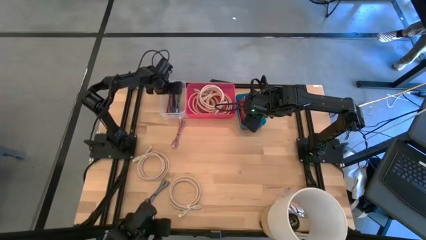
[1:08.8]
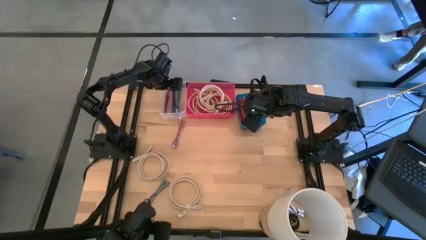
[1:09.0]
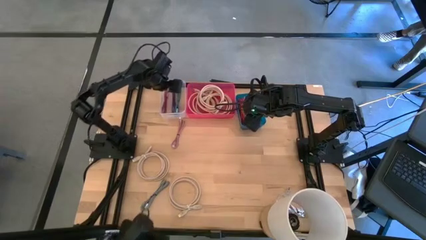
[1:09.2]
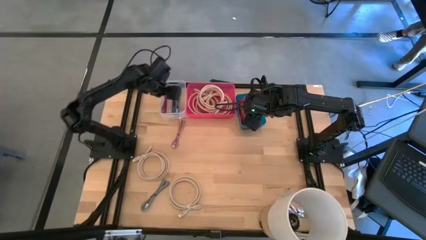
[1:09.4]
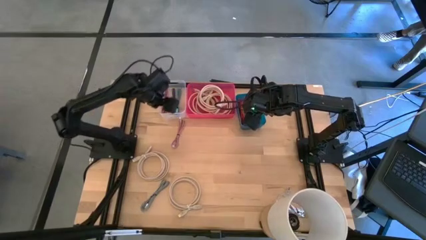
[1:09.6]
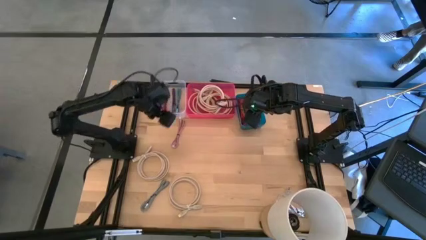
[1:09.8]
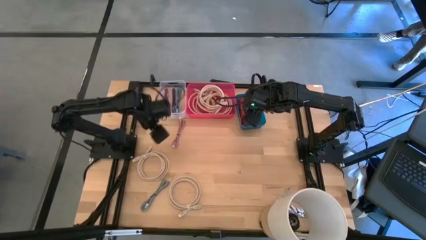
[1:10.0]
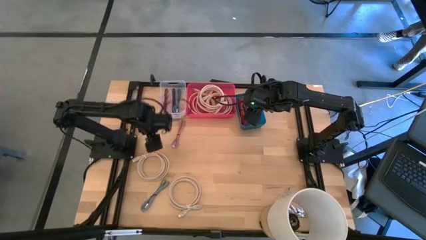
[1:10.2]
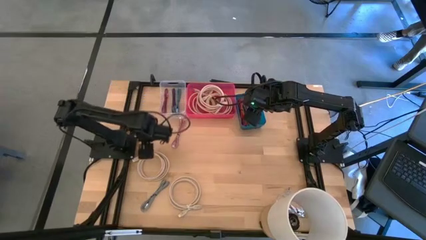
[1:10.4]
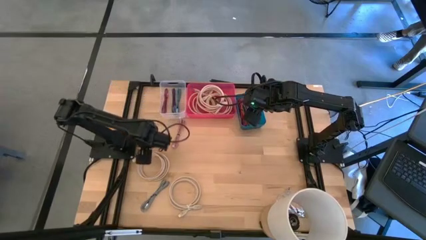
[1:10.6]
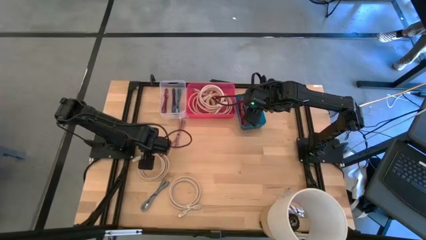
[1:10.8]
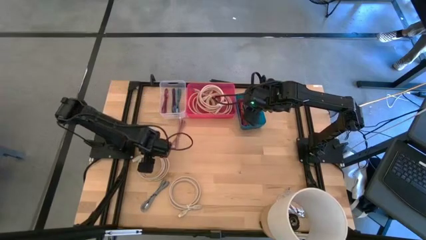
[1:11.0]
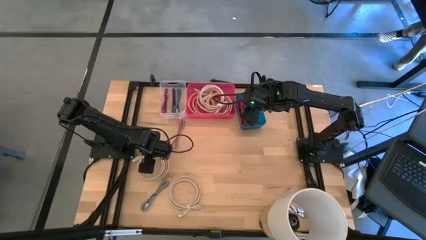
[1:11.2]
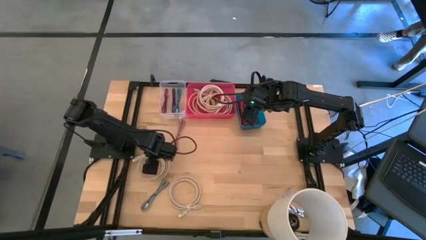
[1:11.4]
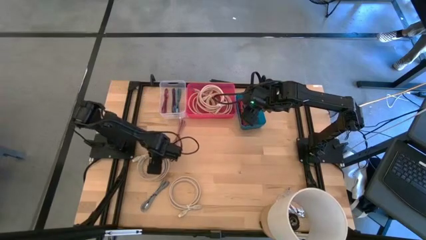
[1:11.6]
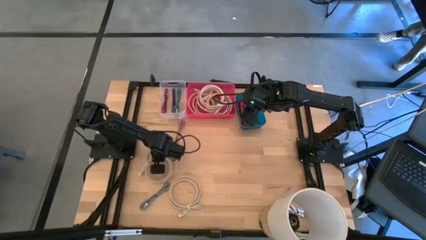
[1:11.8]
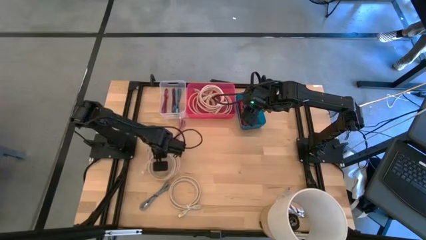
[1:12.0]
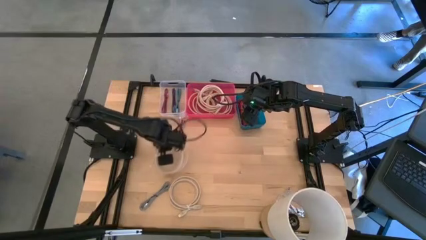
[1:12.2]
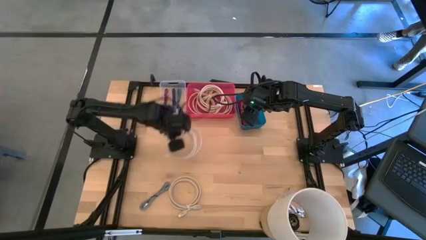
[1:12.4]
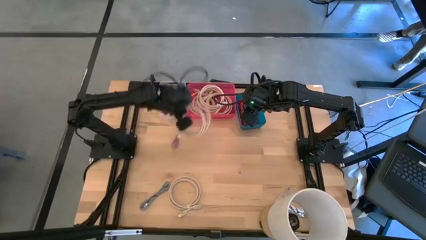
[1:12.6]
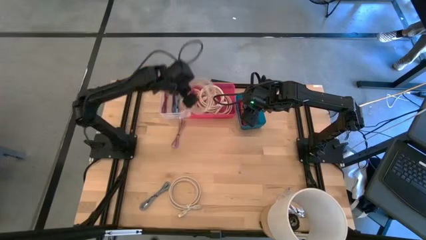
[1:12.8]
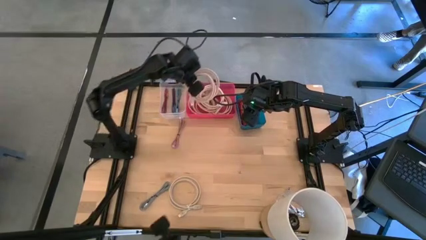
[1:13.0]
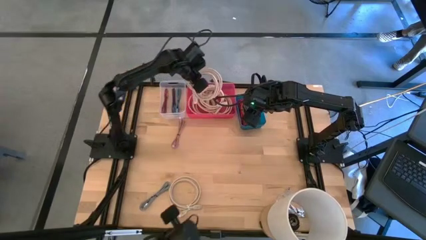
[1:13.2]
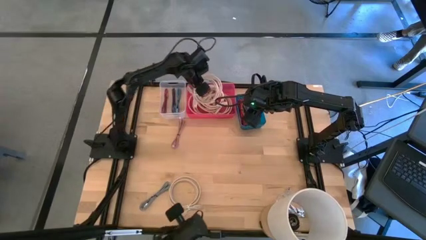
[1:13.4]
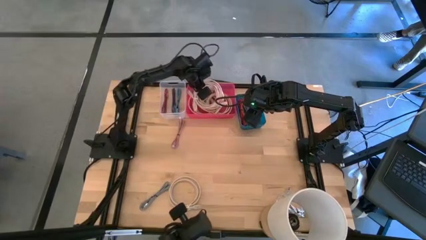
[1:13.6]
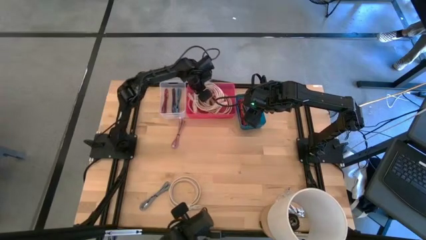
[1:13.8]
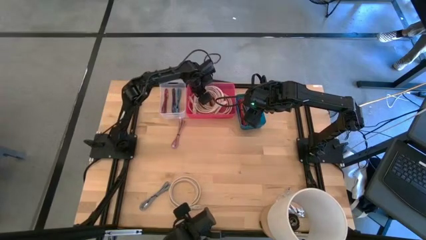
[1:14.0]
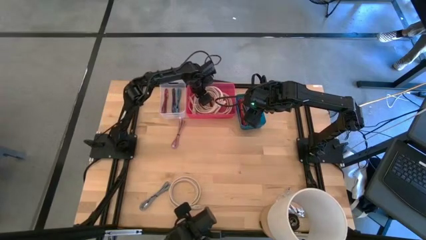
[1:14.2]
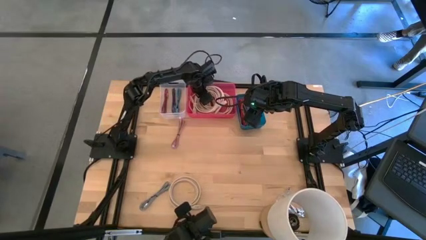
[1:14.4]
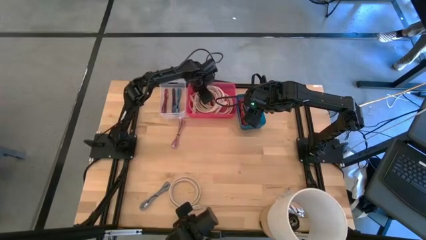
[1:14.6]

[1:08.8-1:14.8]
Task: Pick & Place USB Port
Put the light brown HDMI cable into the pink bin

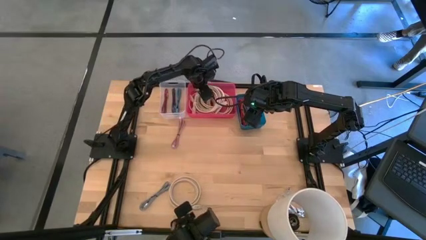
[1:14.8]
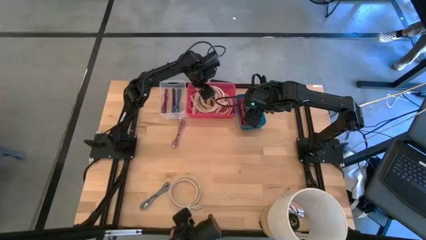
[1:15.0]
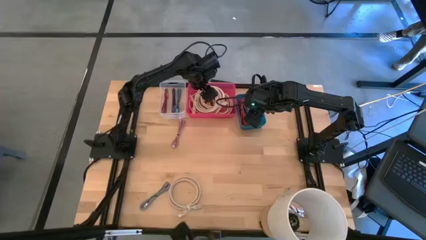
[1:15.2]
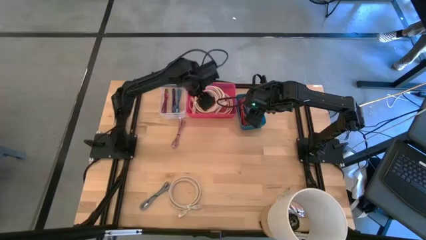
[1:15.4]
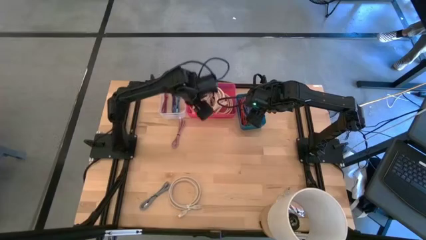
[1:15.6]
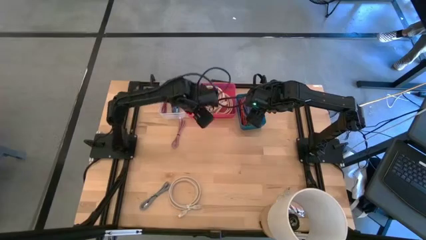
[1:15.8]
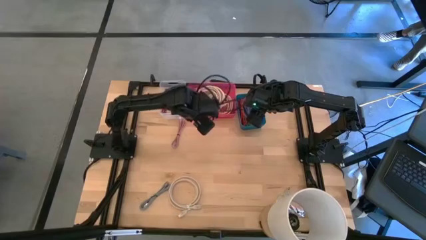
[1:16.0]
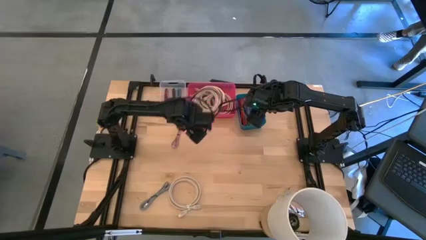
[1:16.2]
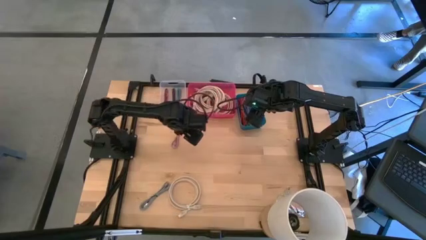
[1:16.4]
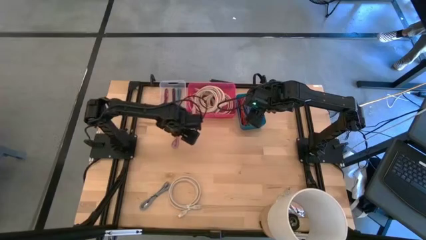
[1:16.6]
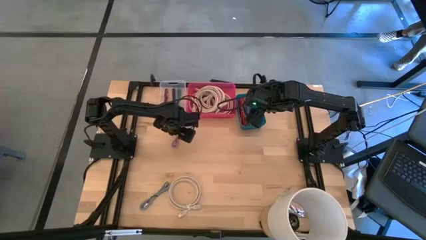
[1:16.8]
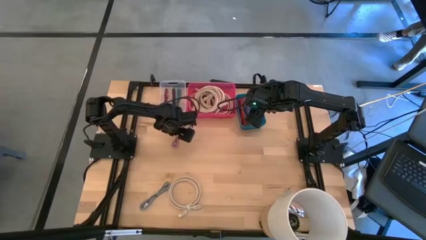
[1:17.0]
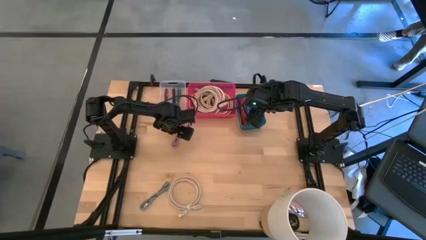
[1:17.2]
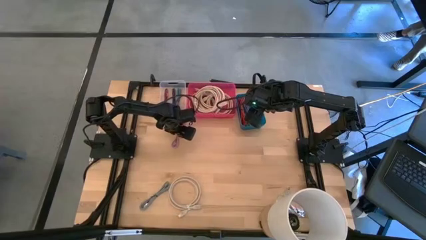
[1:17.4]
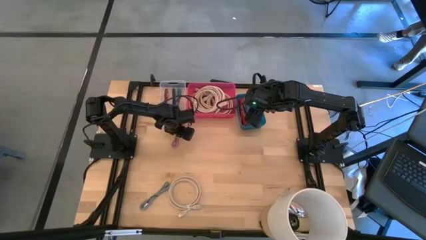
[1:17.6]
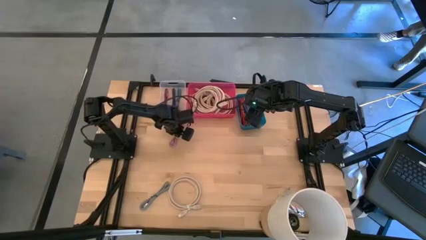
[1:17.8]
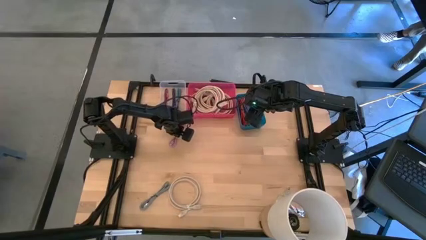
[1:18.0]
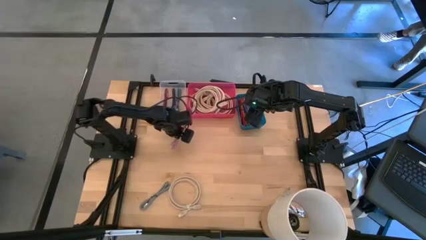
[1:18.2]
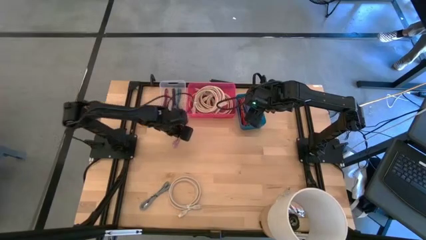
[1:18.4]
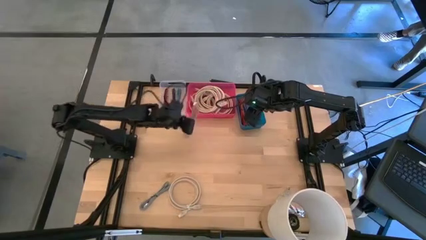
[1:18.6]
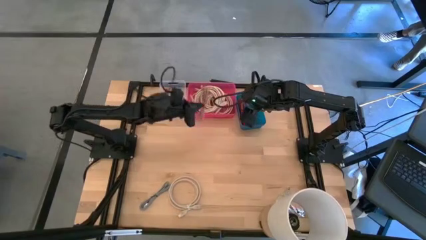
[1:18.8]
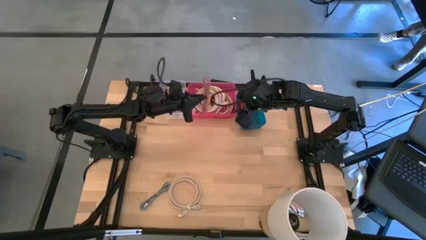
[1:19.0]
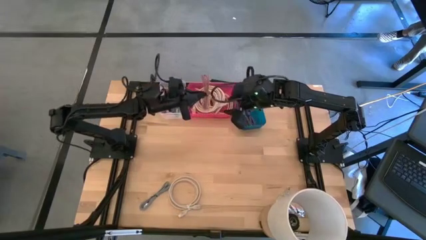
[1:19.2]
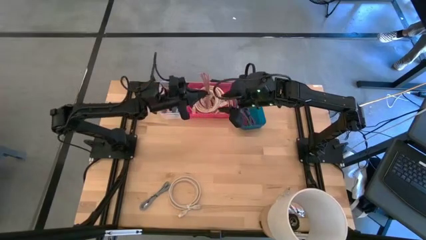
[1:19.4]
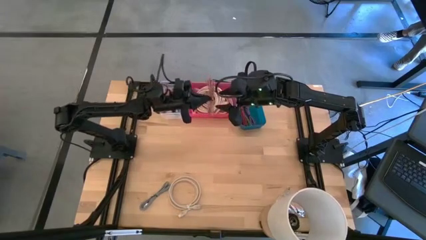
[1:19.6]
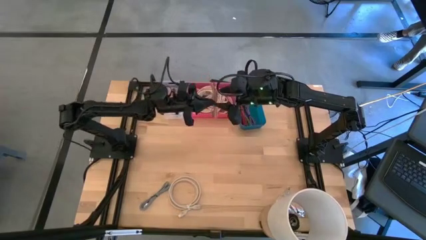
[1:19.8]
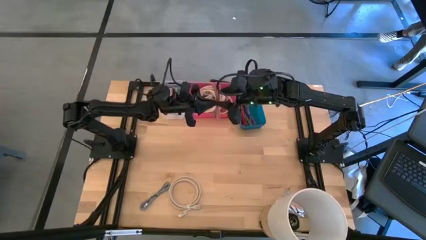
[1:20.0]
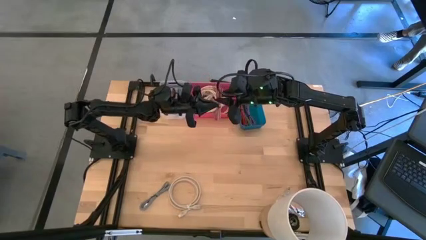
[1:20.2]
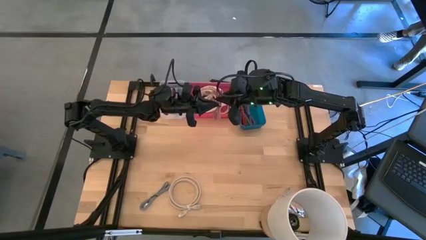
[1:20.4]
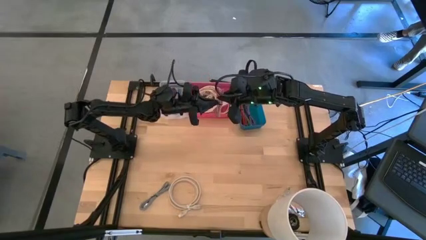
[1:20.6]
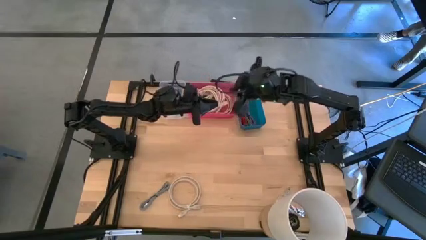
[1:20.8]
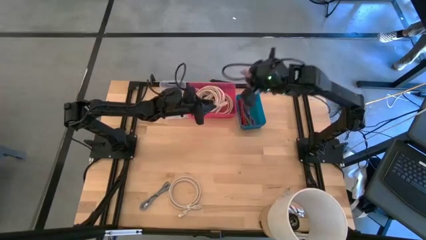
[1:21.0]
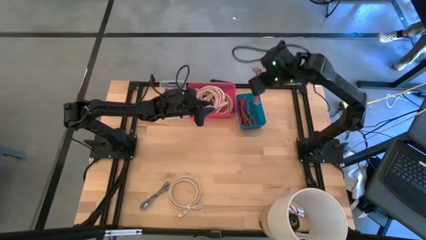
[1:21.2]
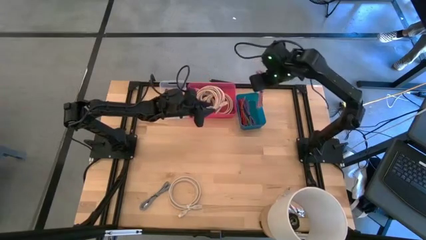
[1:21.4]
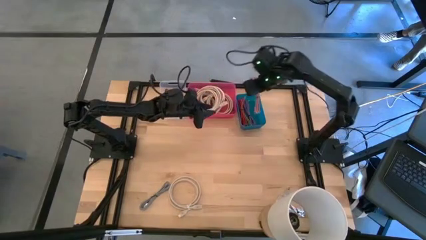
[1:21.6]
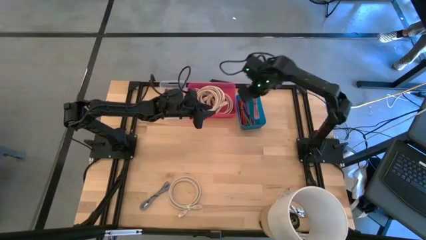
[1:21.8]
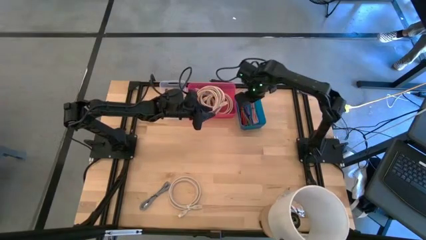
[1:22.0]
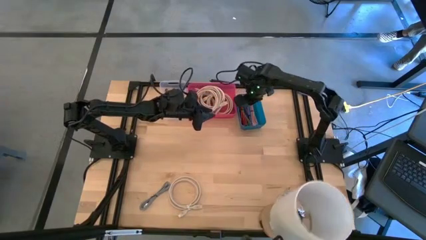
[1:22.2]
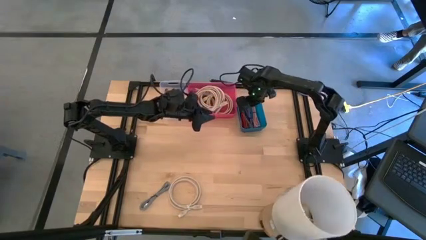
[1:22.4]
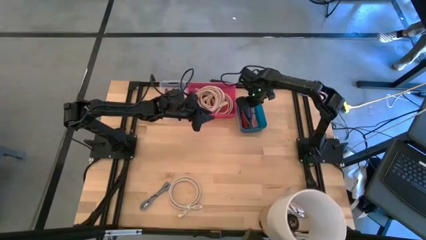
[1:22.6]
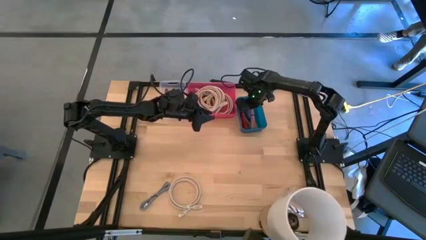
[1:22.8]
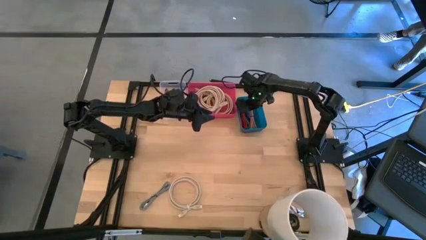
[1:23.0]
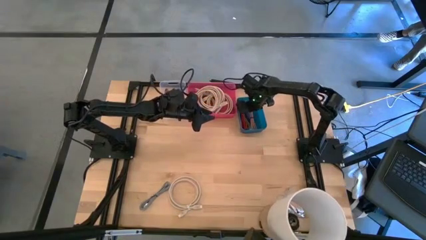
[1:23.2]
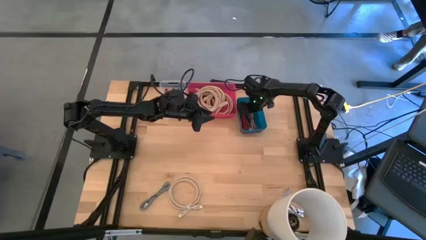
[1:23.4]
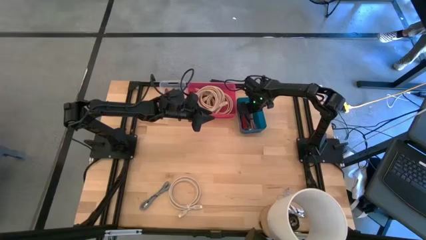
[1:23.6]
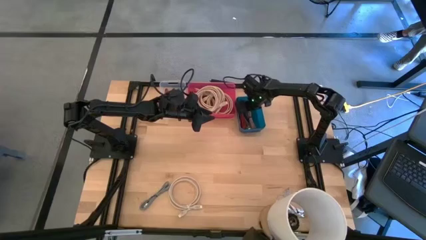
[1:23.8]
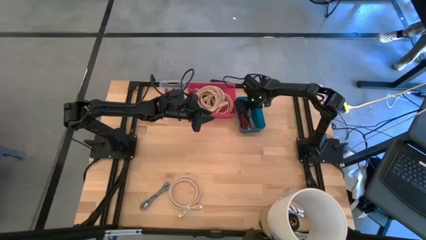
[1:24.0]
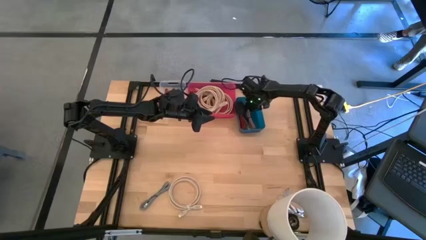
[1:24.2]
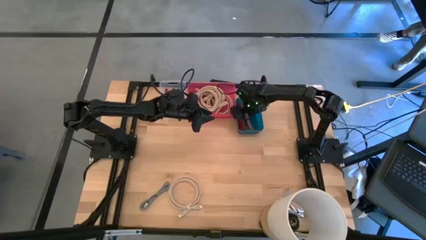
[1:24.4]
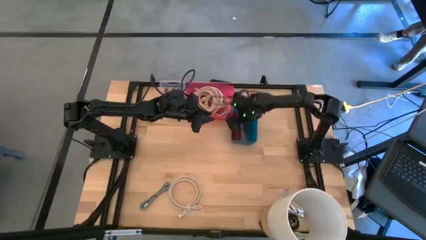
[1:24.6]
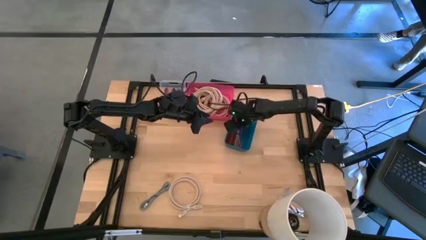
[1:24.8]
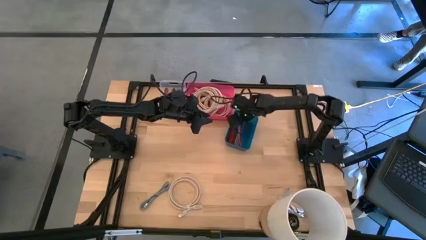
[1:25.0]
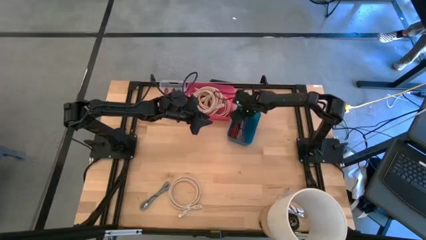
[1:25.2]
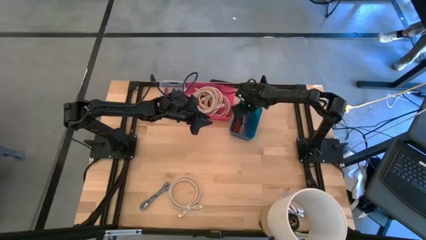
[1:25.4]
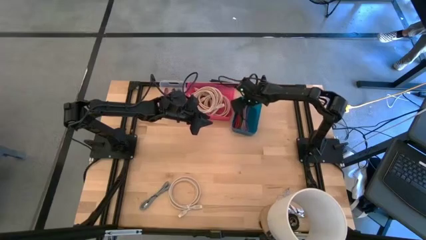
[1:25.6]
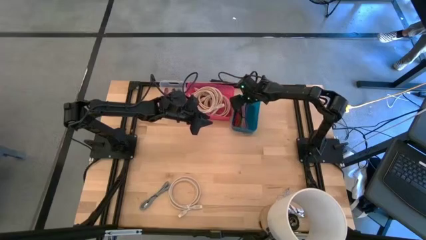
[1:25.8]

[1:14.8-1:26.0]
Put the light pink charger cable into the blue bin
